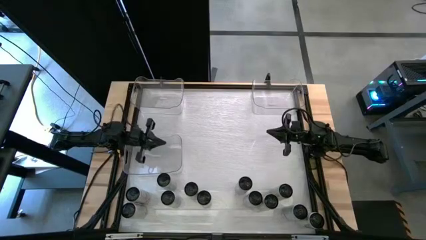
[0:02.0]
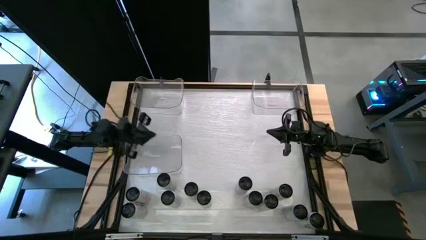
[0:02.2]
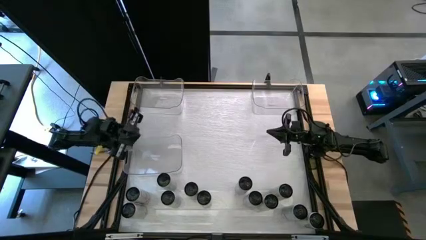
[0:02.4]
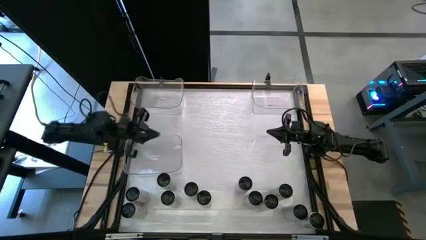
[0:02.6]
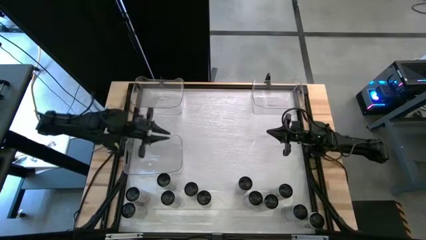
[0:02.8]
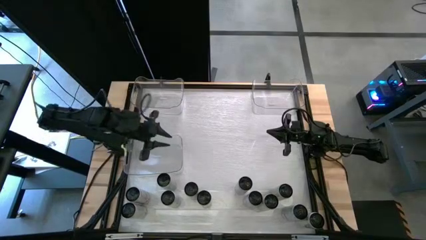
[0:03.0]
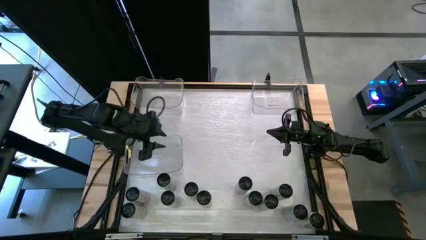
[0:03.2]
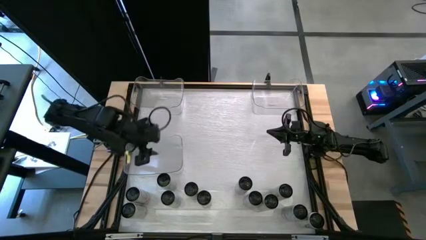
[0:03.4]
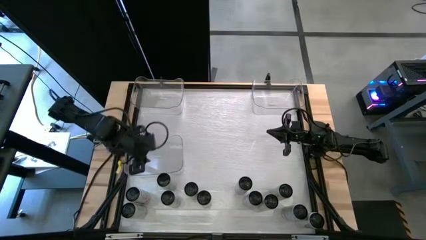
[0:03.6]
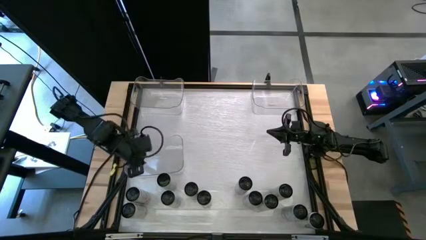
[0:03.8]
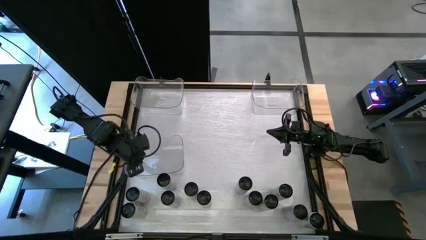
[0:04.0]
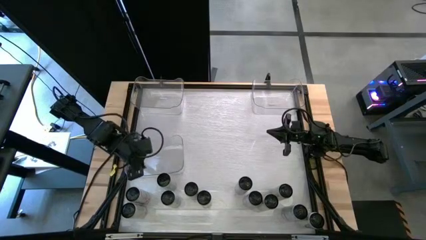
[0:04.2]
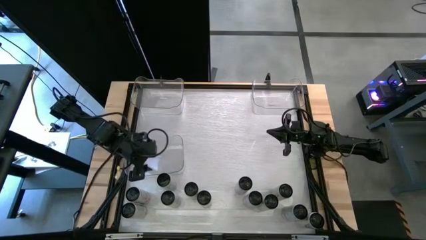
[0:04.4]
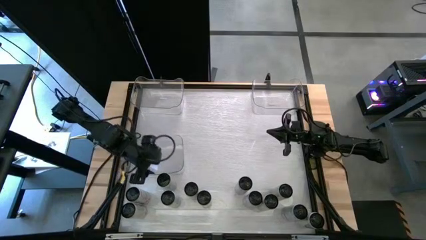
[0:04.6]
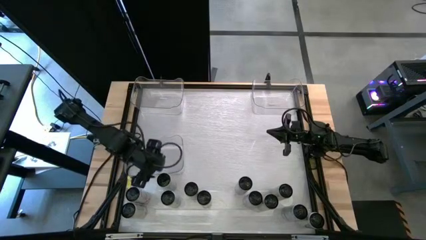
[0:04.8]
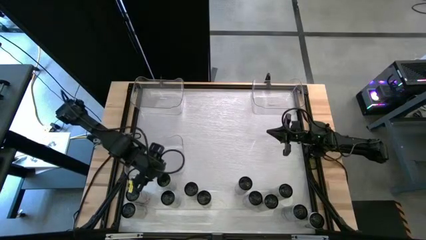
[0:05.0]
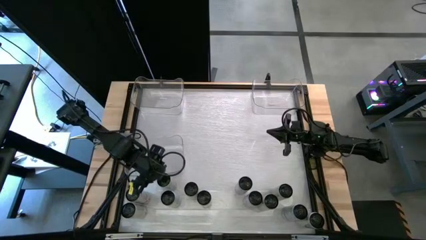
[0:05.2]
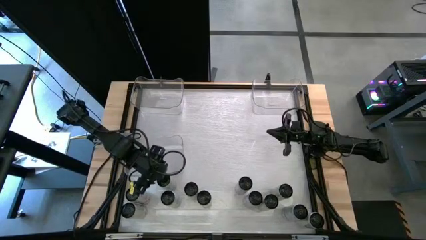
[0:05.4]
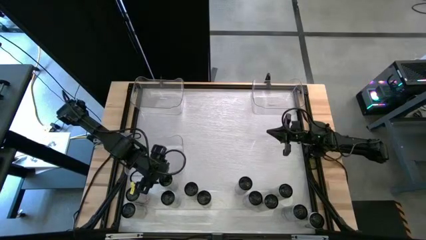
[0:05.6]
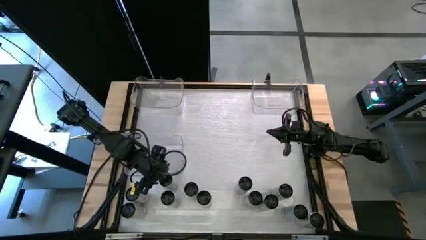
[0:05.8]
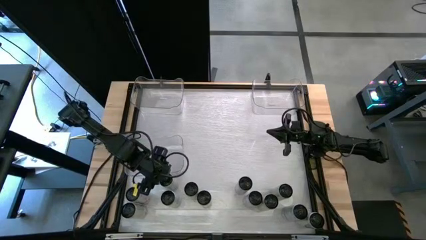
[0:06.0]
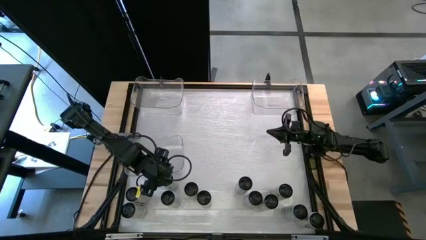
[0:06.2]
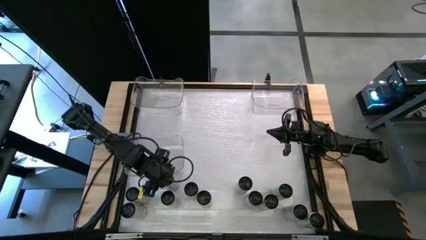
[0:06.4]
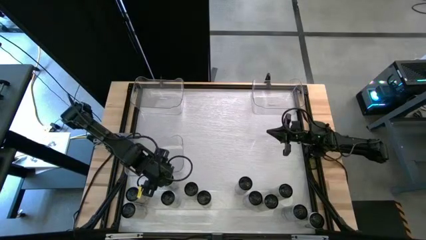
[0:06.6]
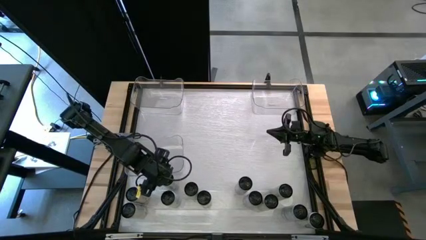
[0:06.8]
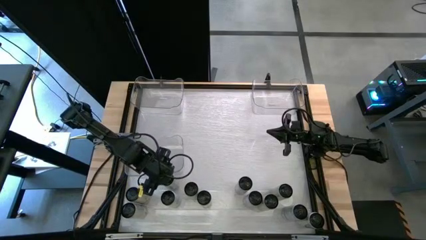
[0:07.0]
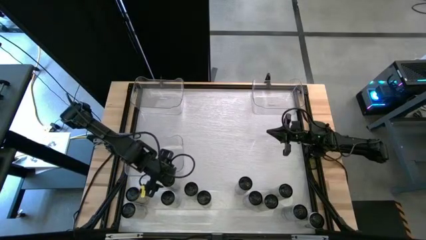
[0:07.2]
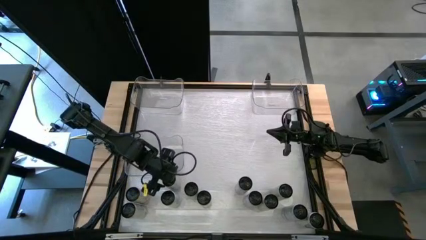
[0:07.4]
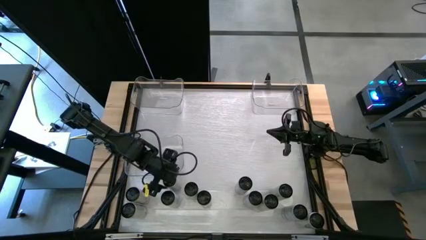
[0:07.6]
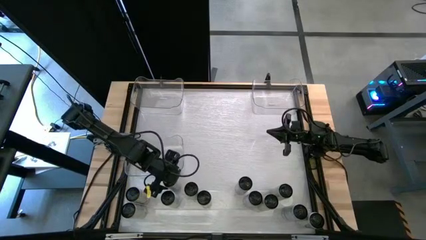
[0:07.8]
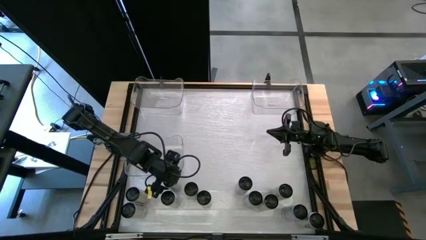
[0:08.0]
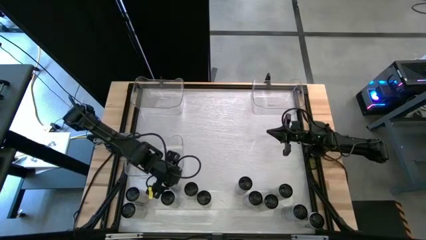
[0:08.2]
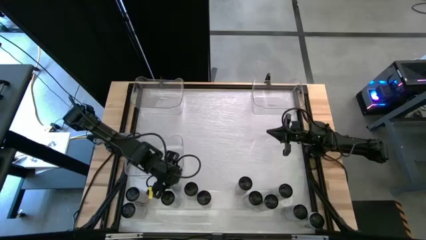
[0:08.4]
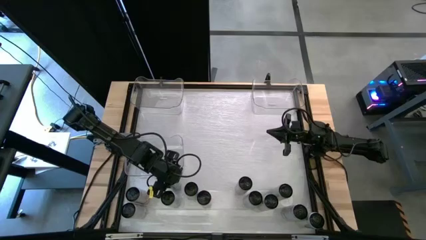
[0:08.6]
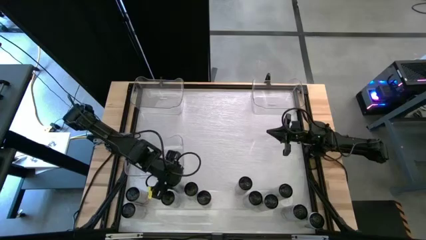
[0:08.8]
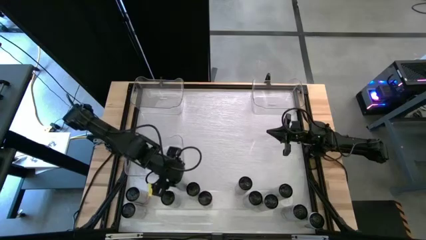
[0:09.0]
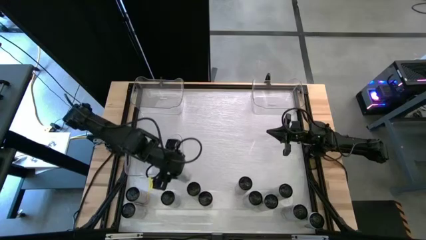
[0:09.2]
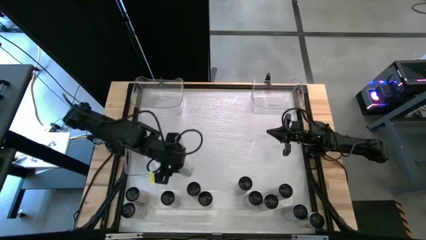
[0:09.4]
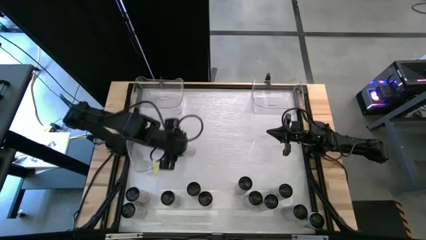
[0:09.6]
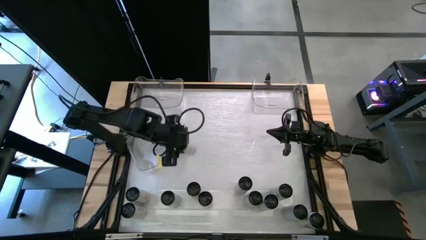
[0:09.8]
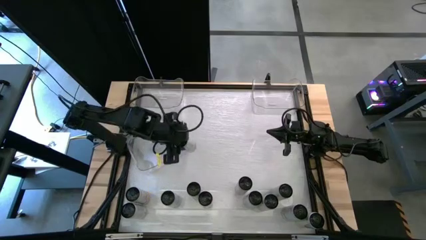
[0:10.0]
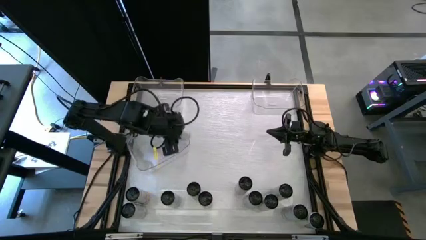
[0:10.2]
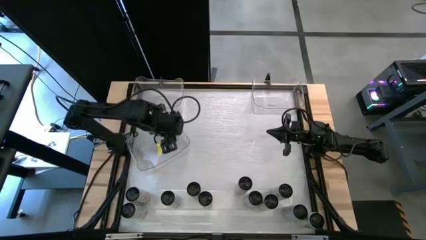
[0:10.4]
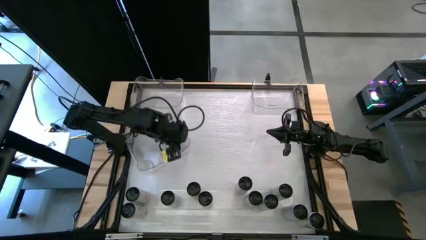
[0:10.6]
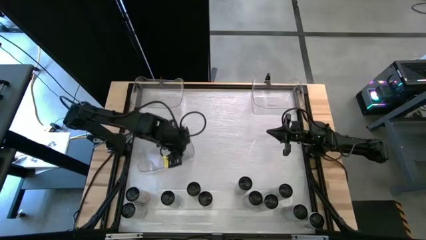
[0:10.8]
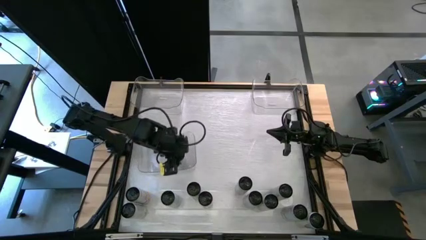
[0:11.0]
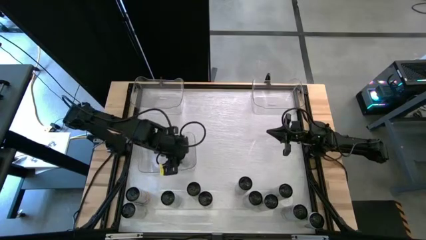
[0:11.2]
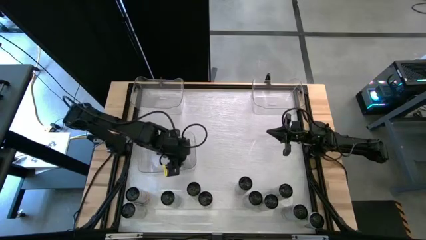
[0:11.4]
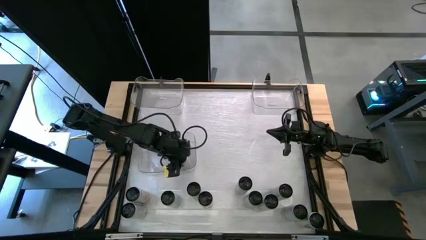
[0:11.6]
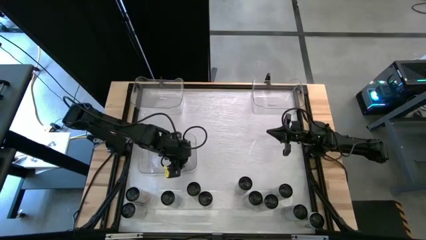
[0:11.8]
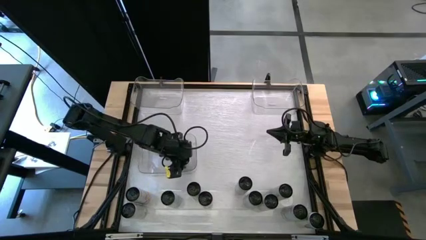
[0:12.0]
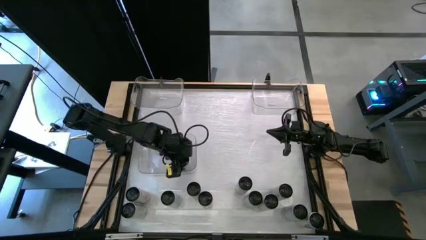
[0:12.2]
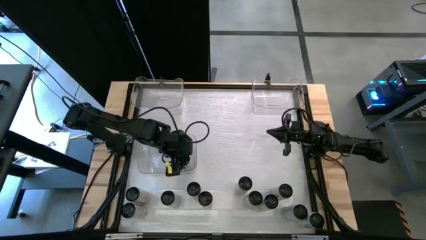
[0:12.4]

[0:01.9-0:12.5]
Task: Sort soda cans
Put the white-pink can into the bottom transparent bin

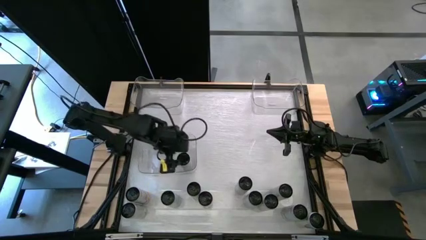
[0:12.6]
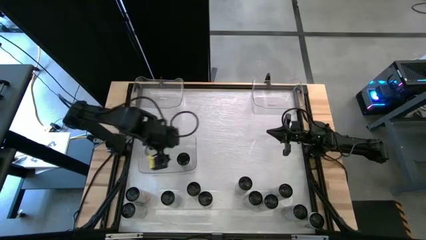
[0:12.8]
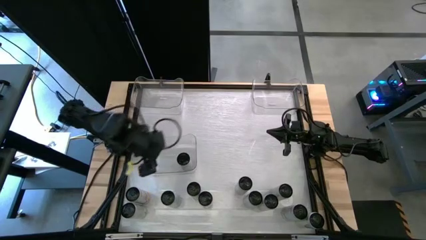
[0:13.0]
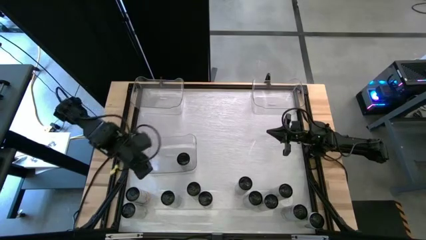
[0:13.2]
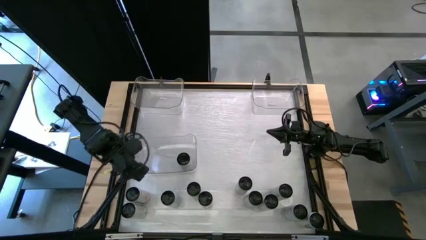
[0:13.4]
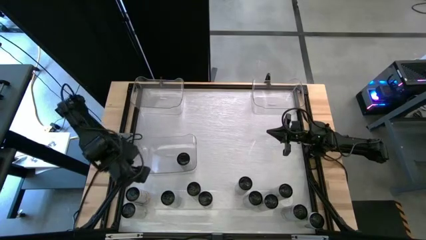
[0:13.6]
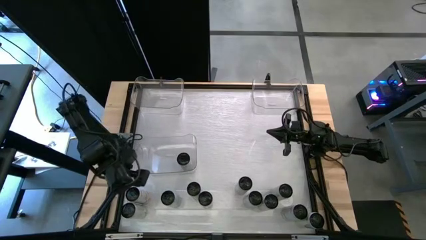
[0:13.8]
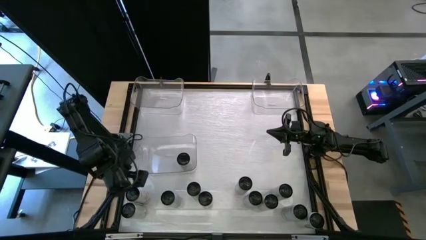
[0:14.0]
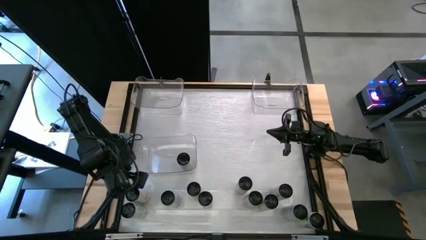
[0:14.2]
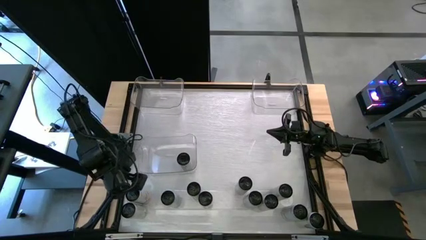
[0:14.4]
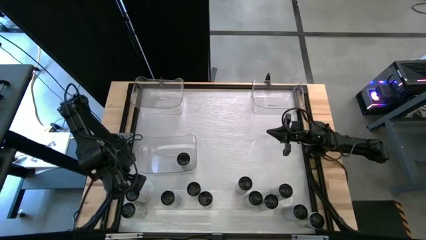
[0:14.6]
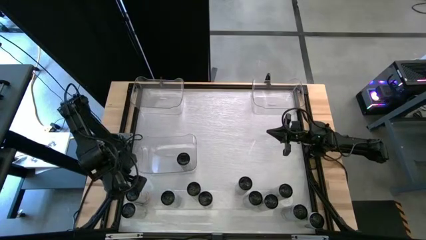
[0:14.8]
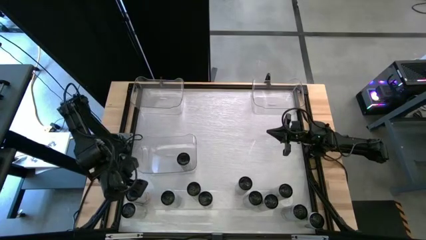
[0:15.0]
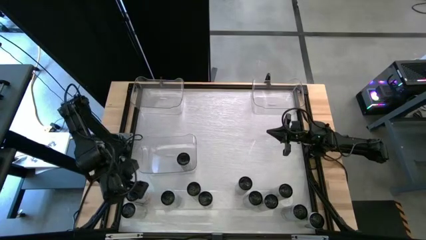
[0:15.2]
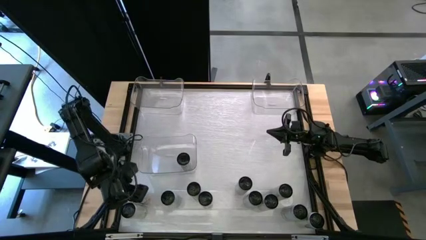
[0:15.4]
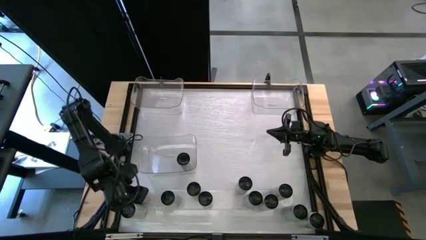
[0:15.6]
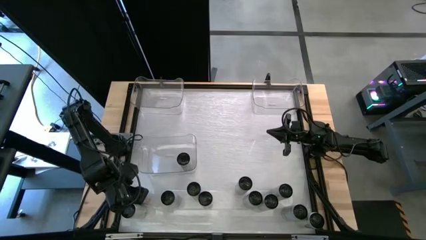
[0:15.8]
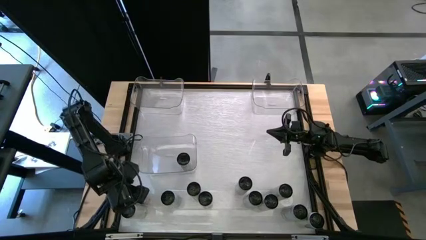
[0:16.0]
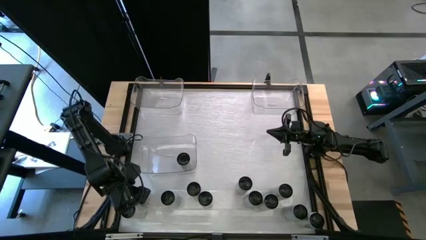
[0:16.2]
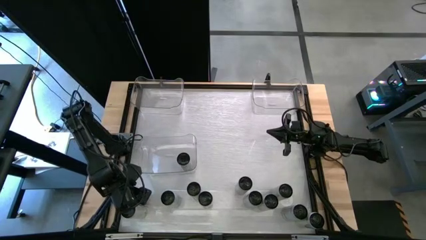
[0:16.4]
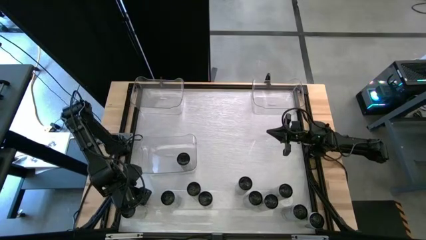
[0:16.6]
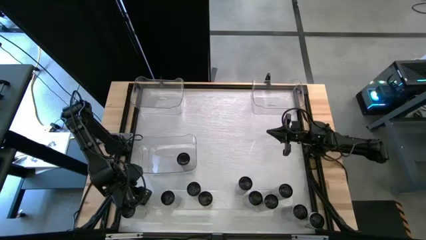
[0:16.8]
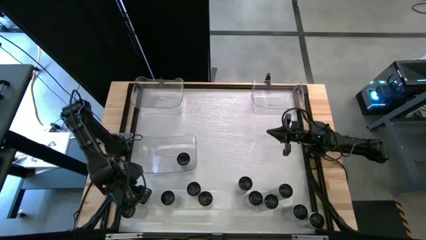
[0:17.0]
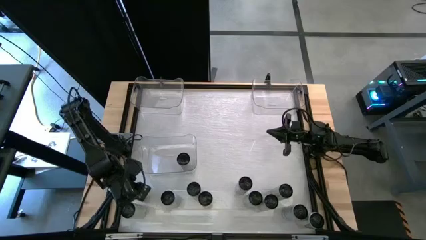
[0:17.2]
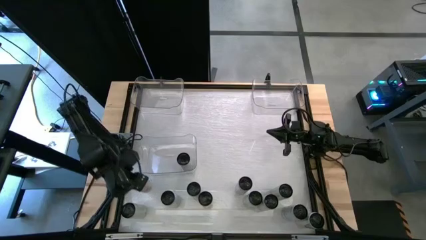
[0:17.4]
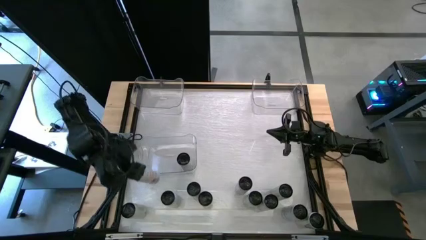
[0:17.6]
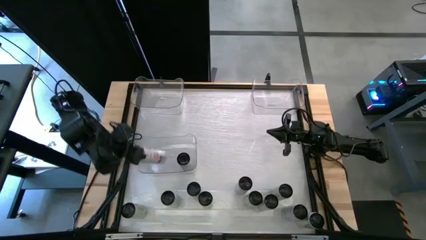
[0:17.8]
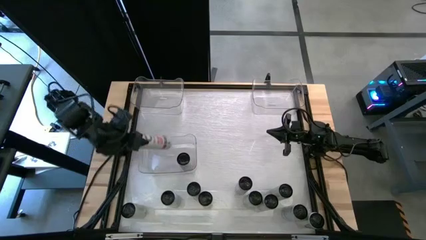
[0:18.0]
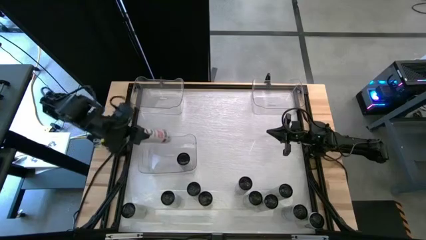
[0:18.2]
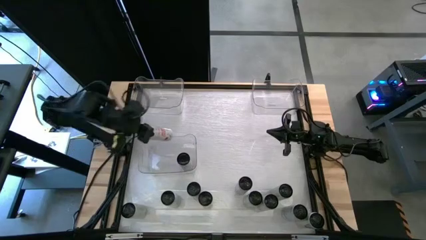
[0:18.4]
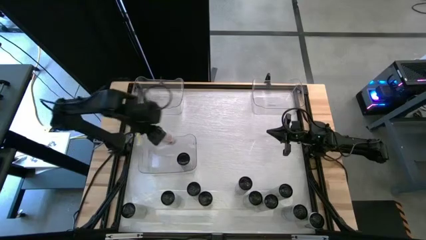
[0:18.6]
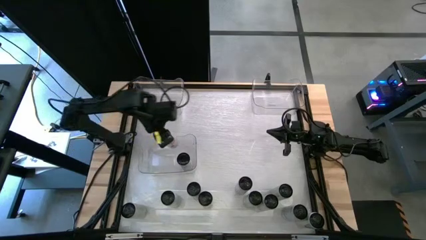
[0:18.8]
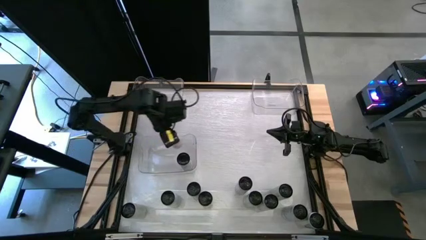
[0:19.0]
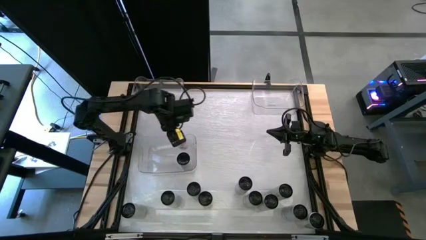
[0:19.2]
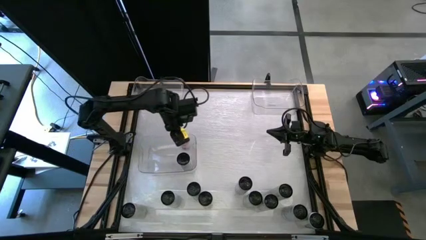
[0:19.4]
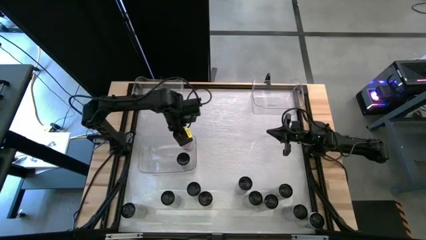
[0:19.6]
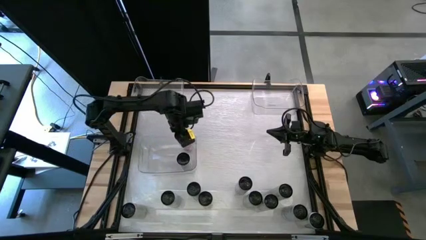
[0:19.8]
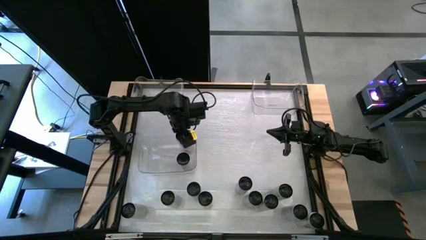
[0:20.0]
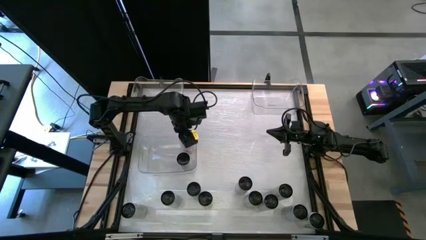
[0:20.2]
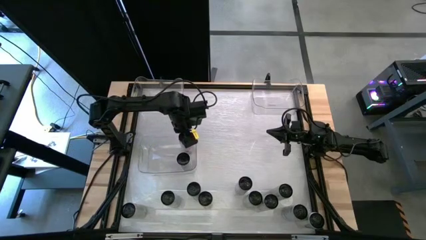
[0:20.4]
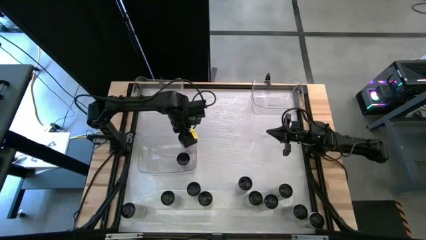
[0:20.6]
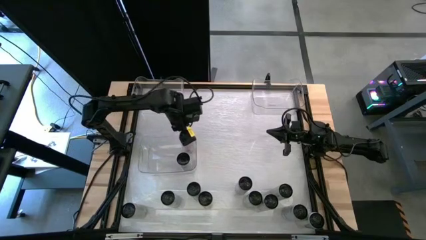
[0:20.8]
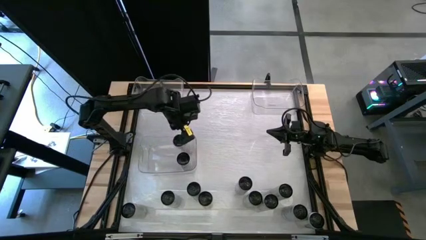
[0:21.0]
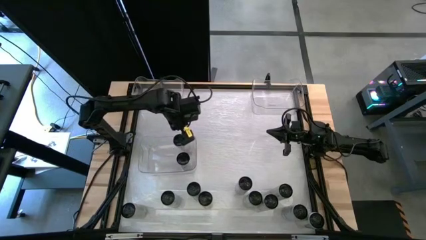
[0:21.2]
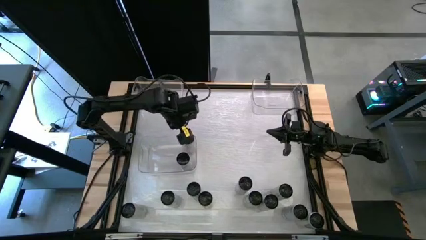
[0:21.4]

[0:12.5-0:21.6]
Put the white-pink can into the bottom transparent bin
